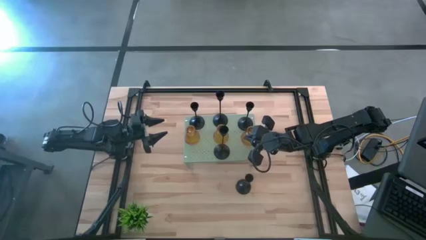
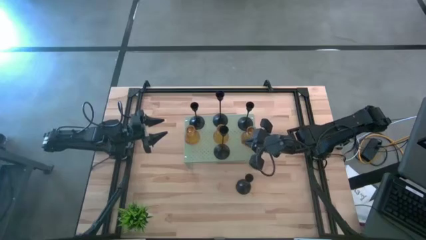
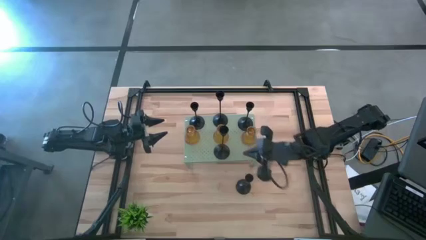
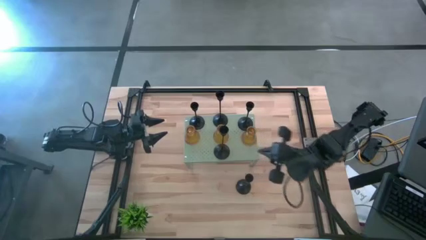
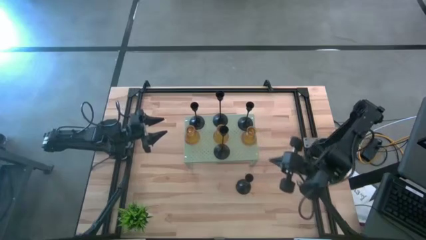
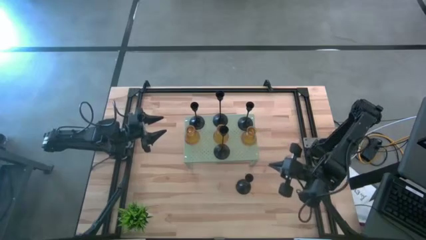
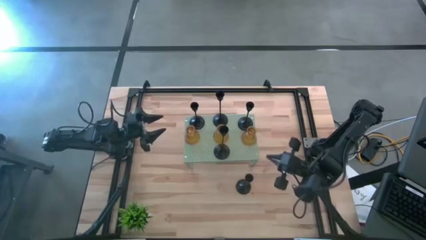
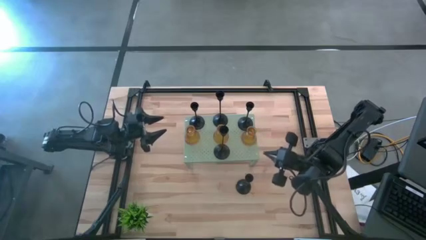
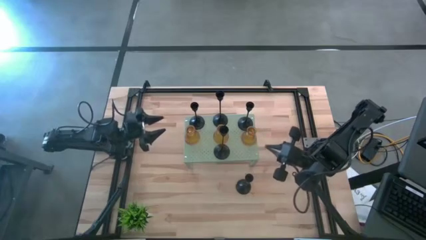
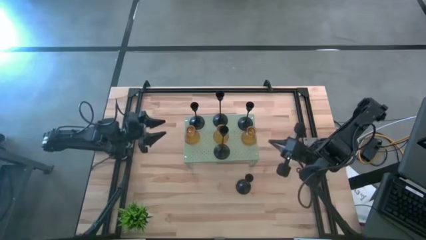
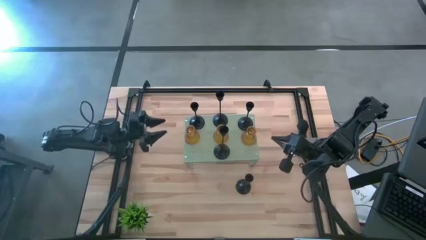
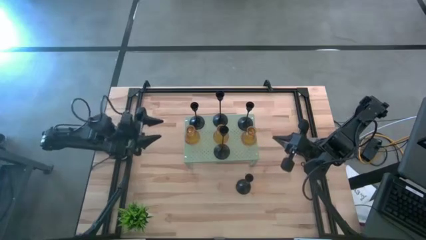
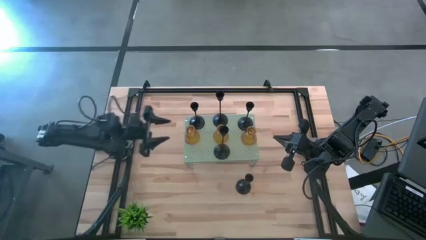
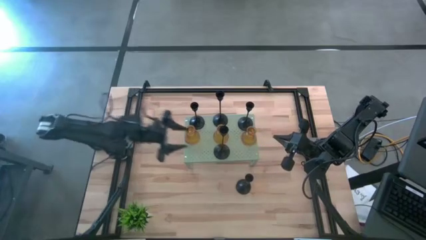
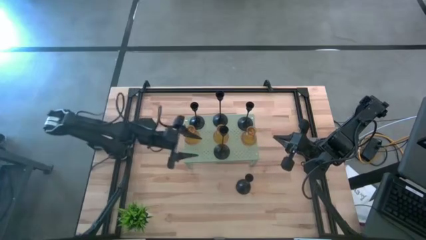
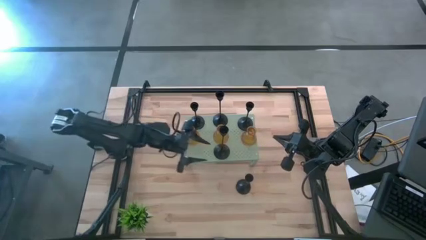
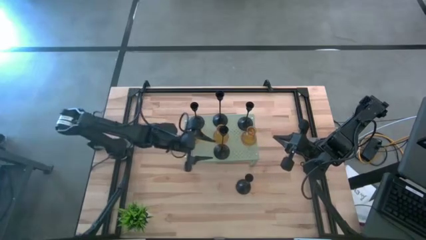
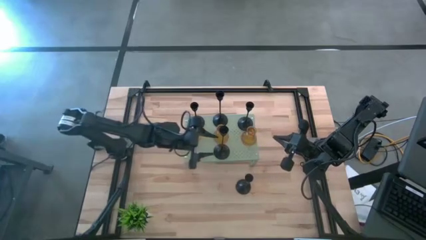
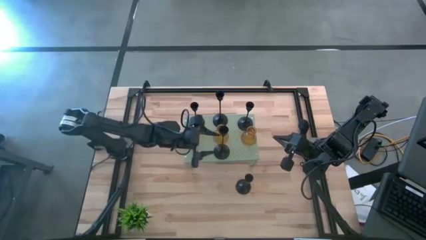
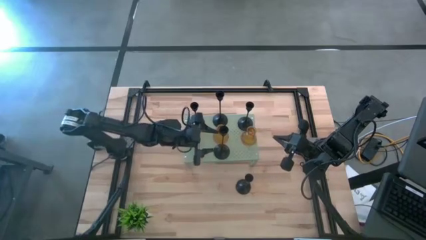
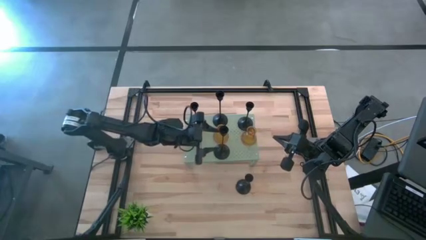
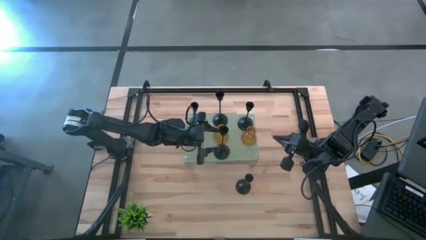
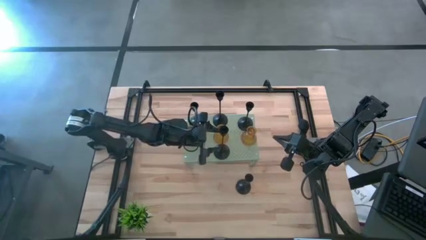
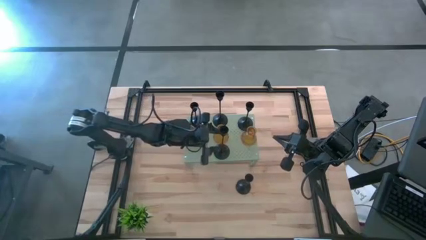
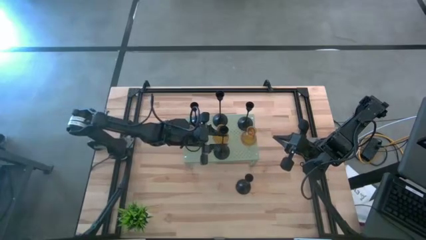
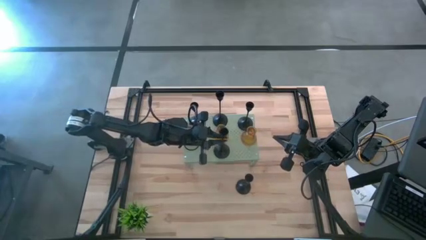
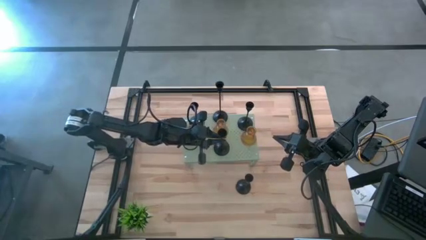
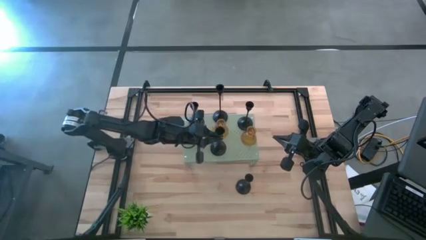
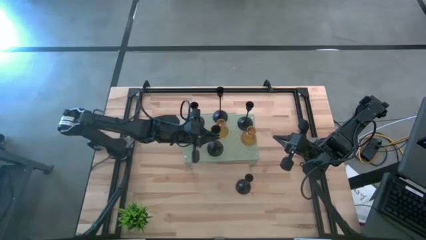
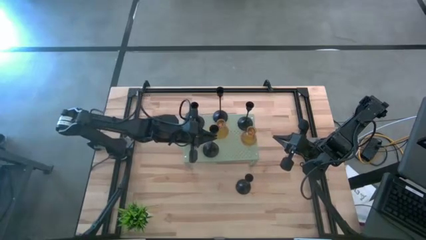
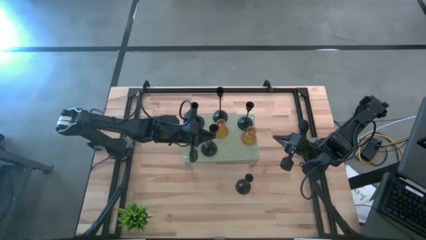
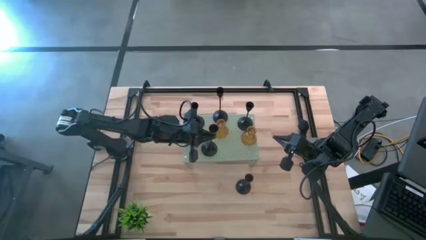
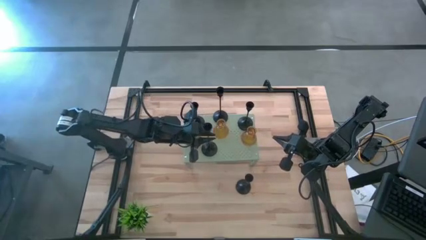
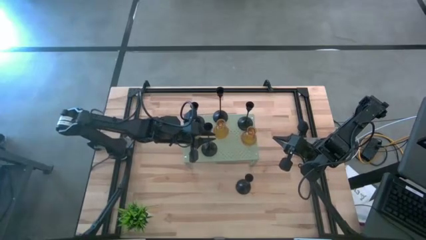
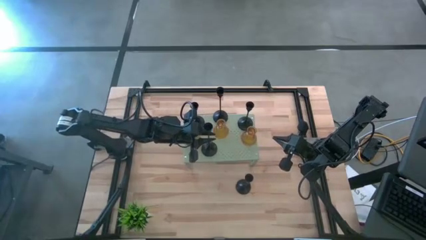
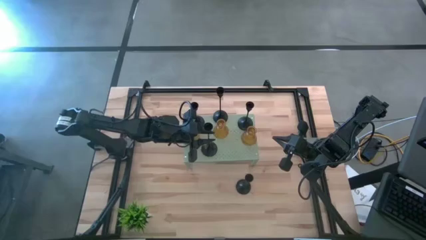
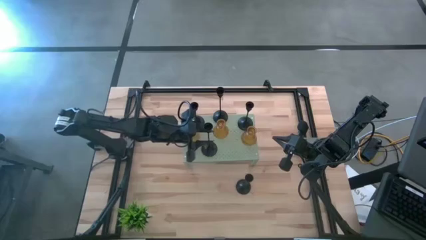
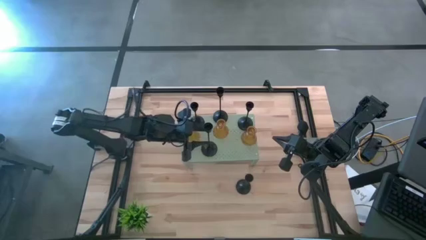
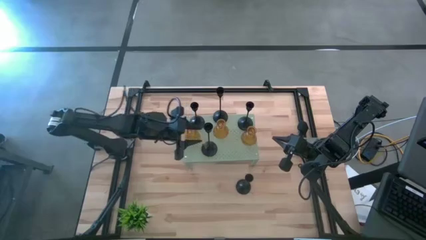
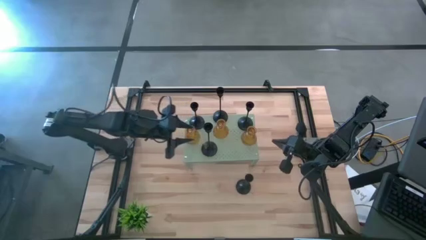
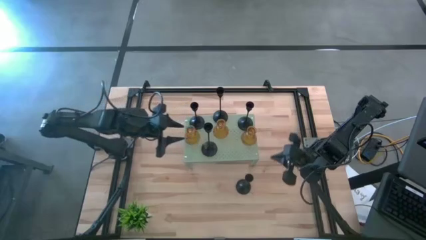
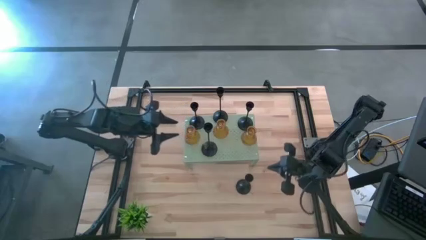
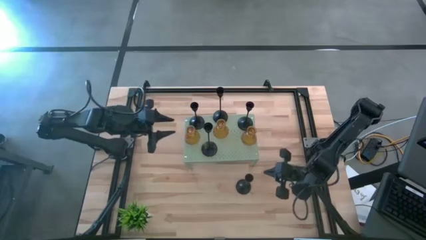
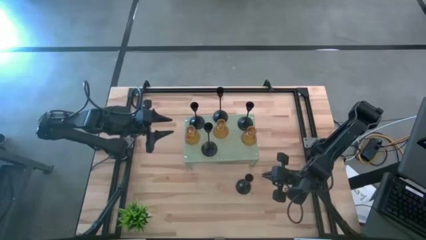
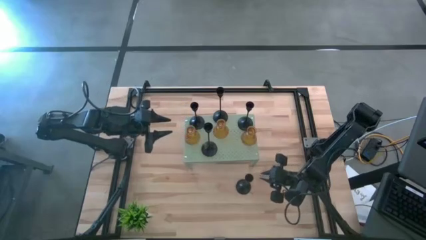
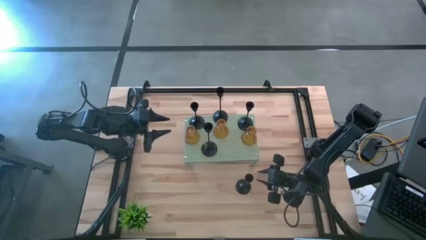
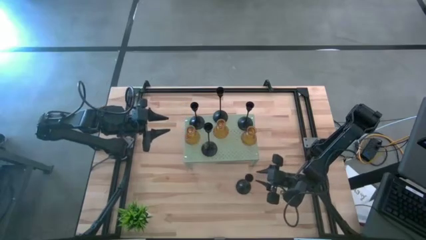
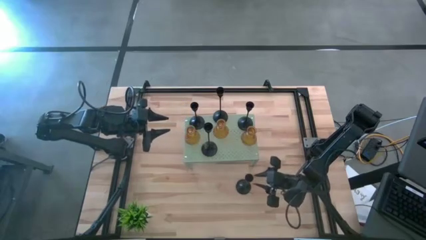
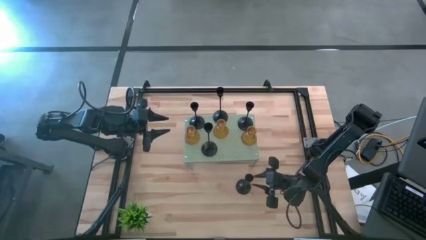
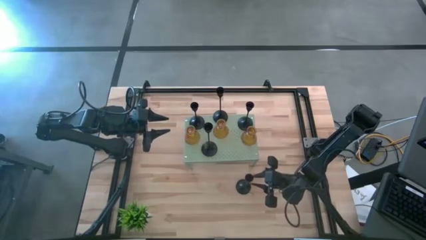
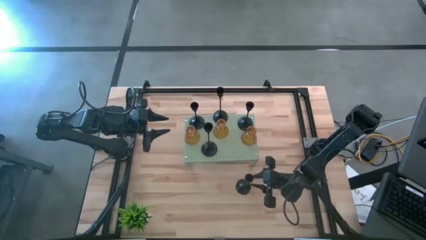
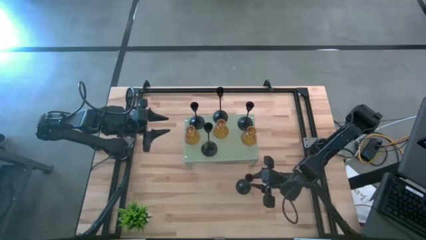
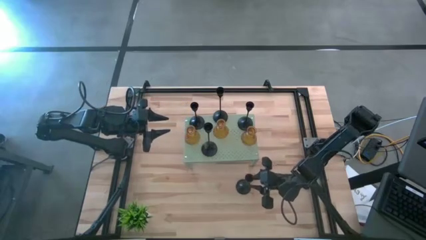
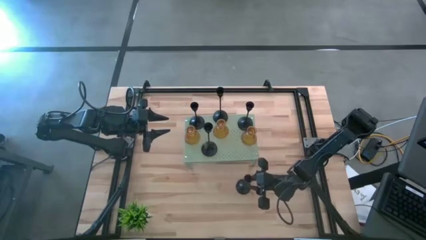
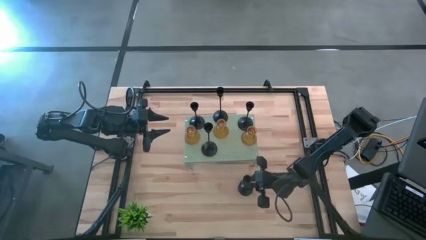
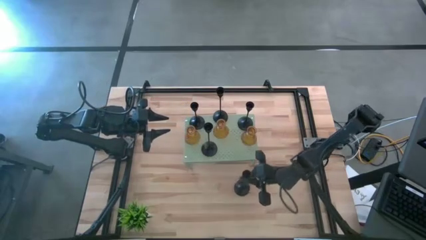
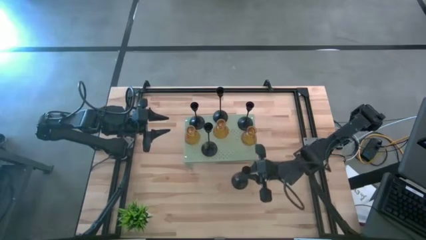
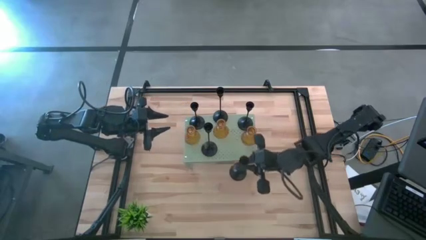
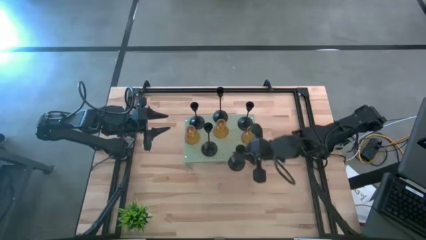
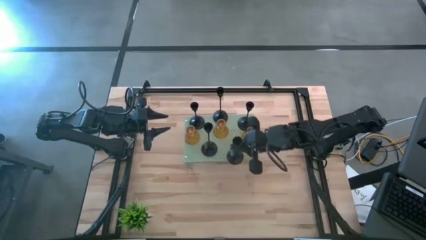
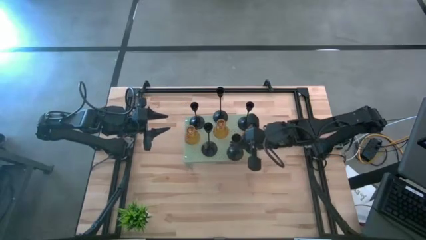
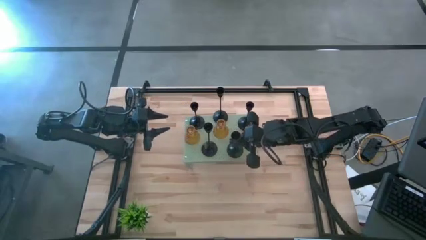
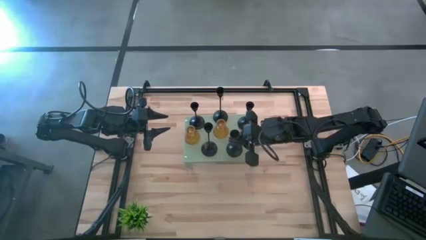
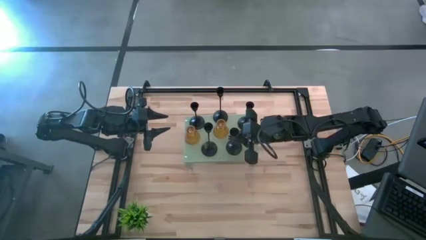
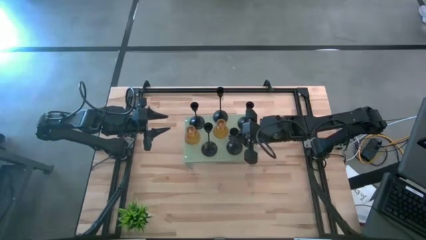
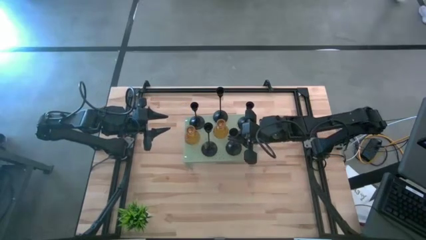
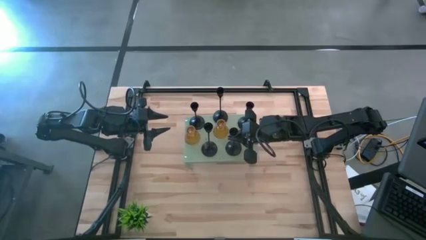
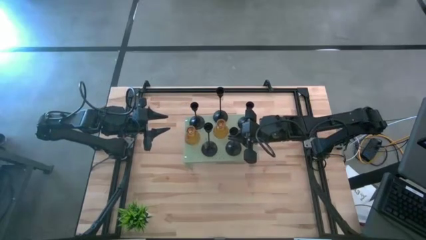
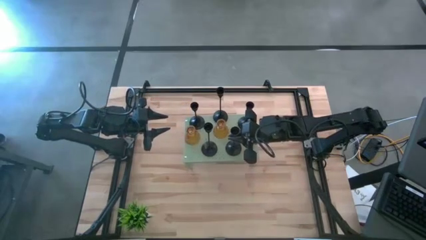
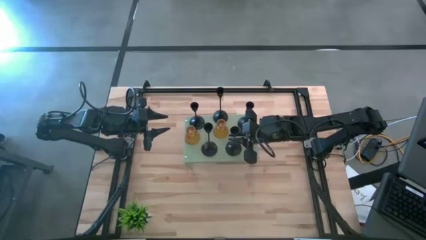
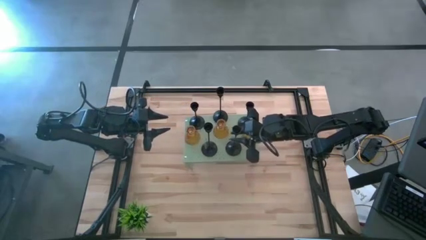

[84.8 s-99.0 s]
Task: Pick & Place candle stick holders
Put the black candle holder on the shelf
